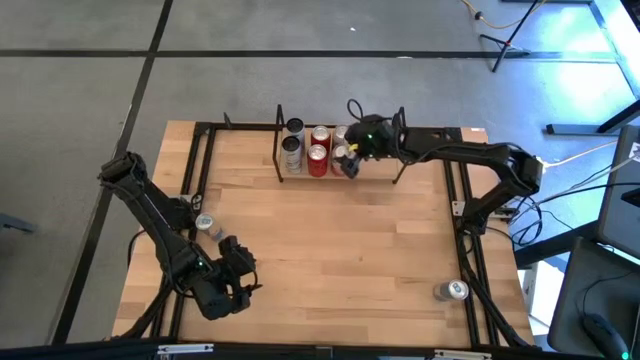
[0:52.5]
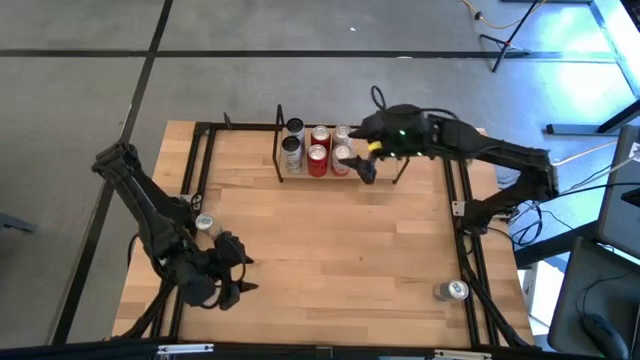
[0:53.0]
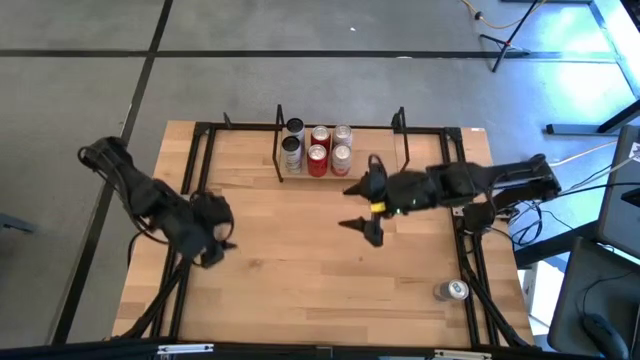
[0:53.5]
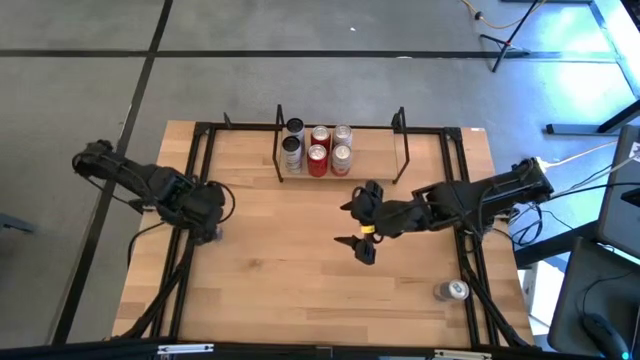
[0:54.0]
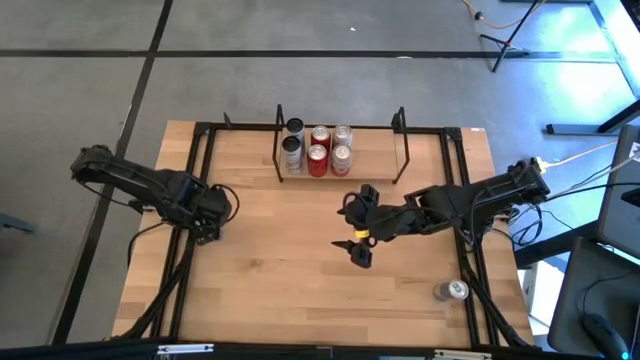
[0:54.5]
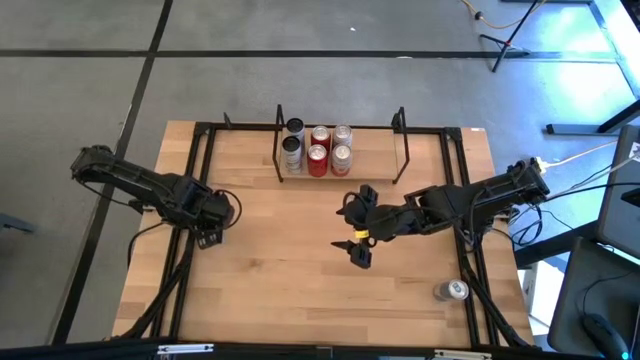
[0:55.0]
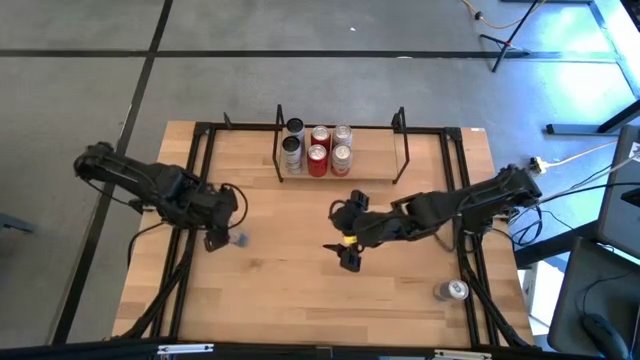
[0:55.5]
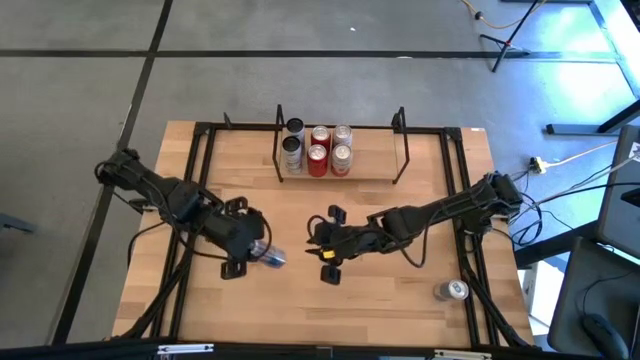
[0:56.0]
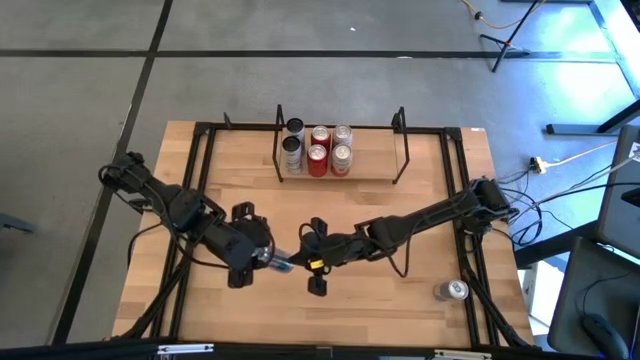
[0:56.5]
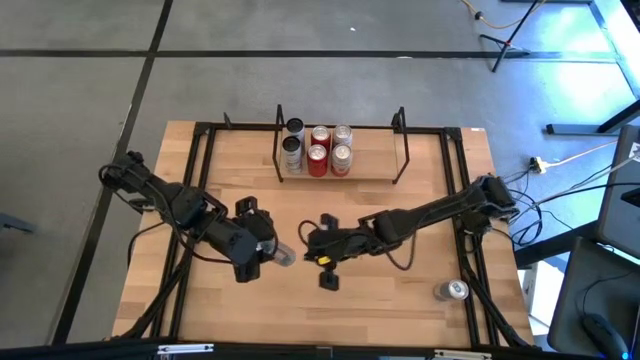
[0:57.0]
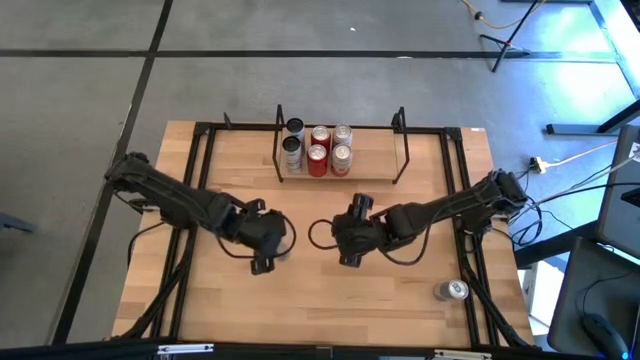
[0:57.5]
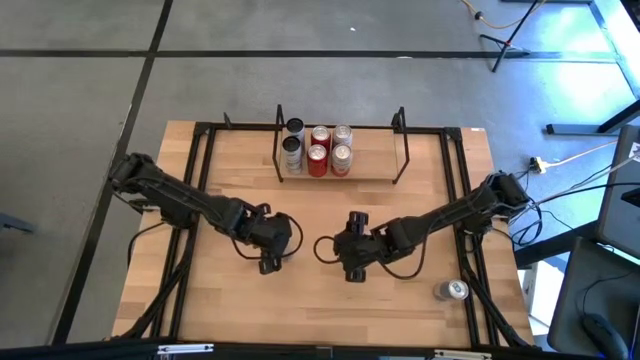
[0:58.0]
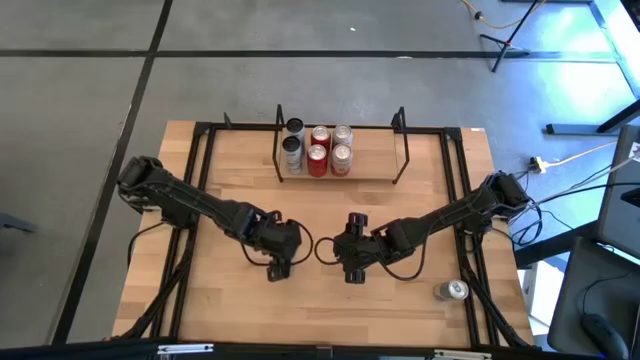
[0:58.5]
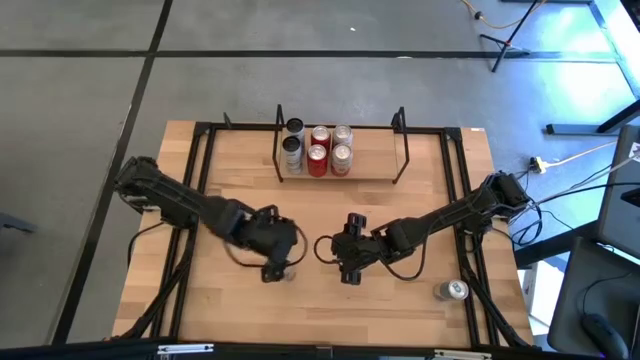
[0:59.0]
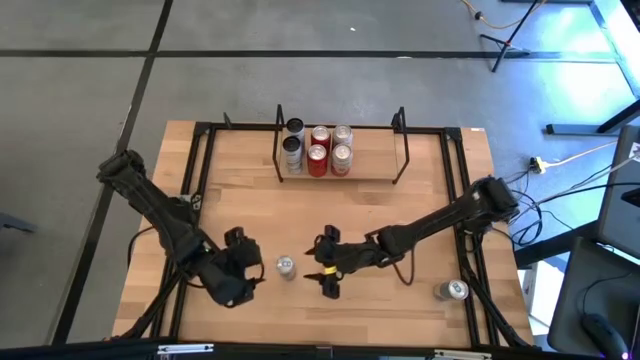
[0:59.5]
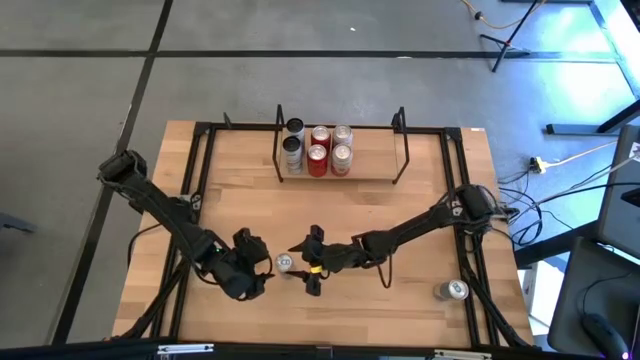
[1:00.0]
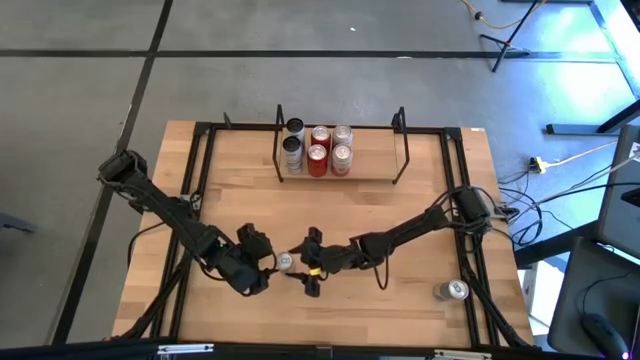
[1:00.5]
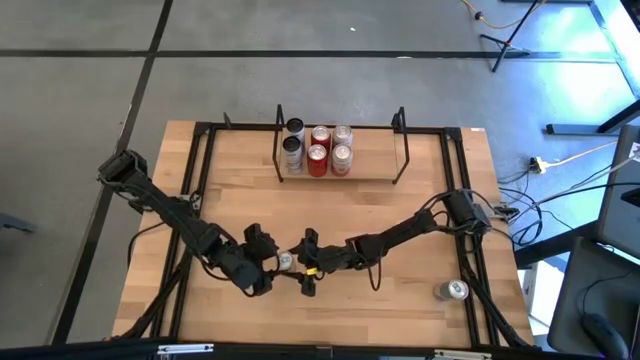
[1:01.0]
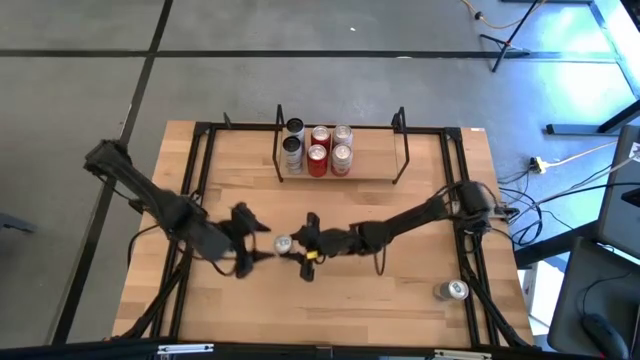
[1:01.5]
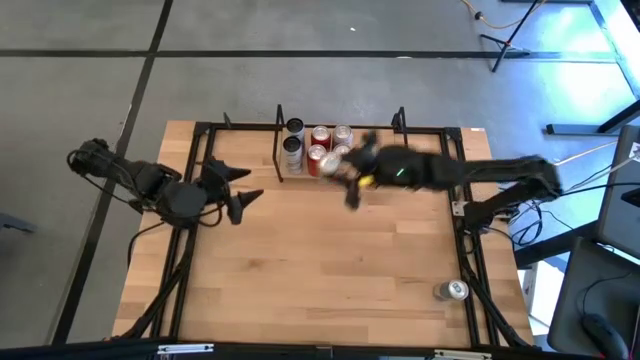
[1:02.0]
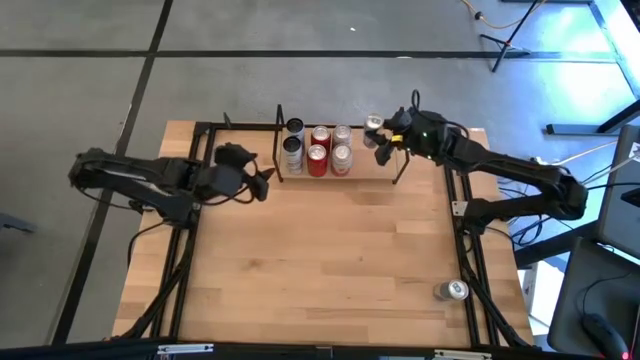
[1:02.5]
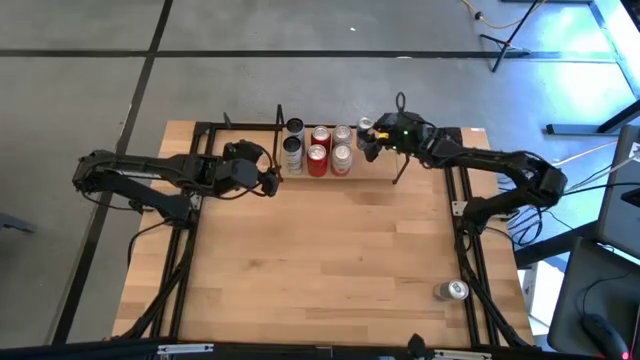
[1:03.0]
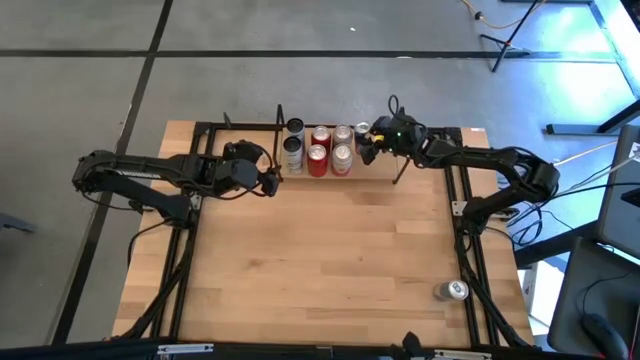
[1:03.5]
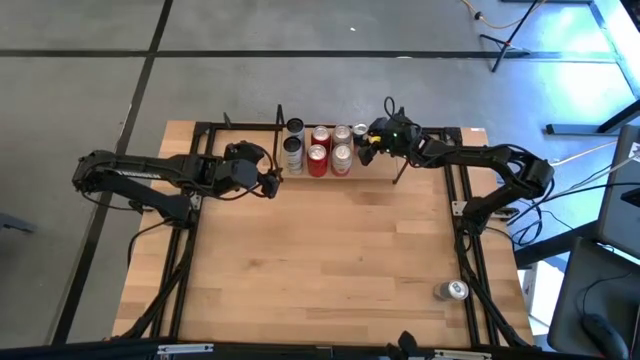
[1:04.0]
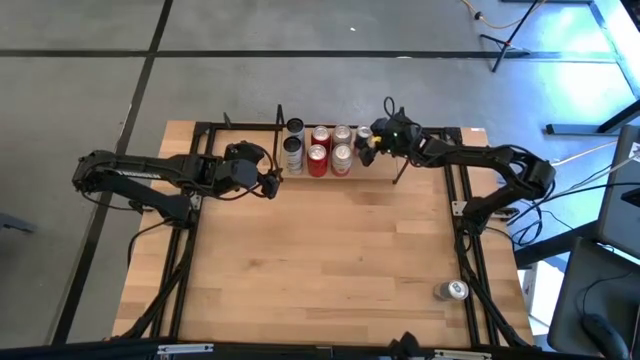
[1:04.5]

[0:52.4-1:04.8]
Task: Place canned beverage on shelf
Put the left blue soda can on the shelf

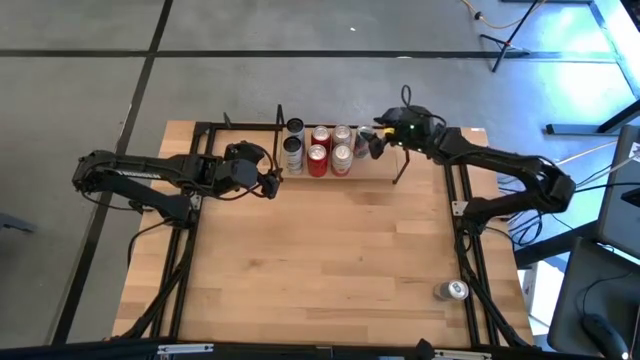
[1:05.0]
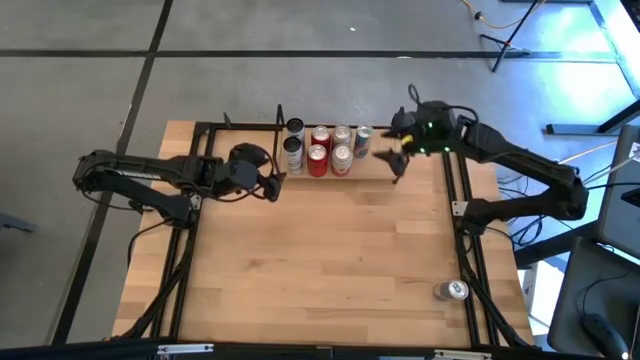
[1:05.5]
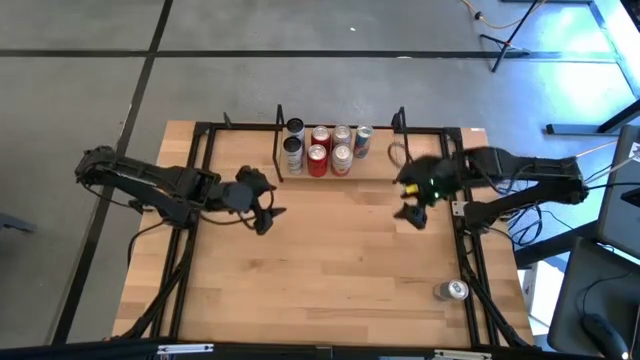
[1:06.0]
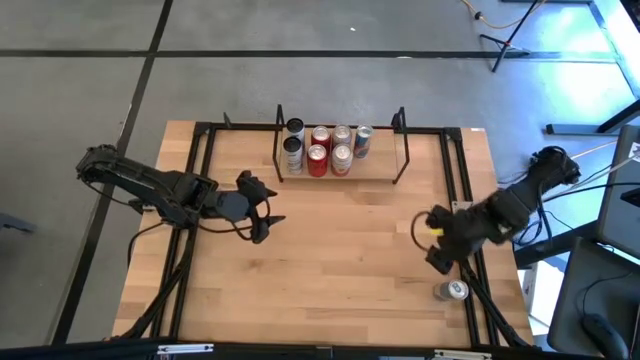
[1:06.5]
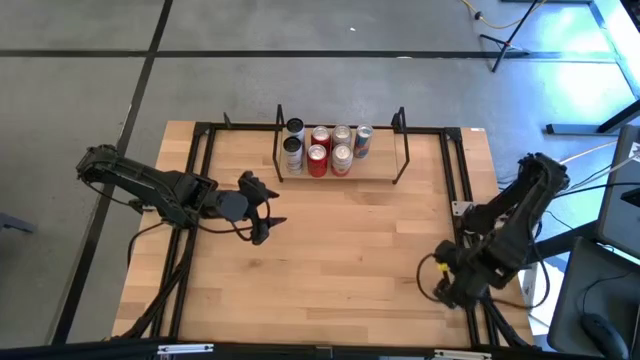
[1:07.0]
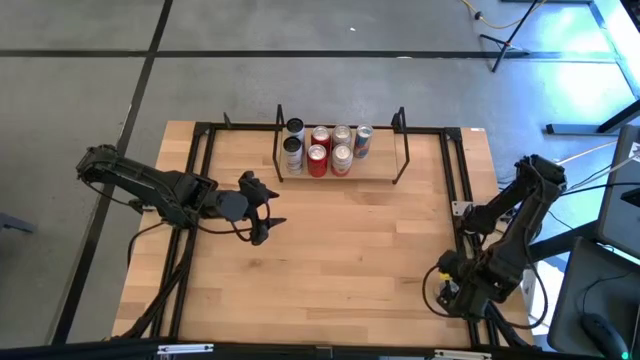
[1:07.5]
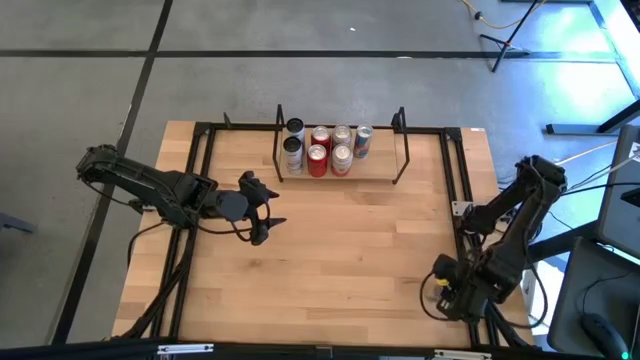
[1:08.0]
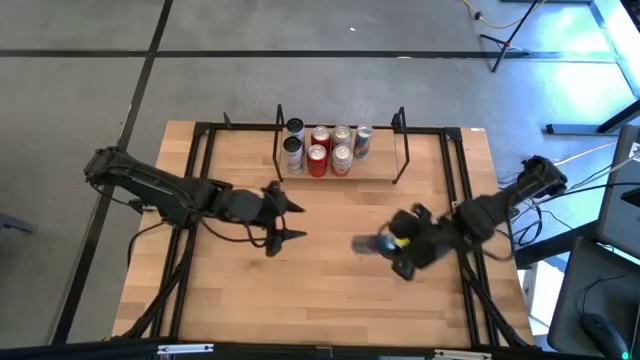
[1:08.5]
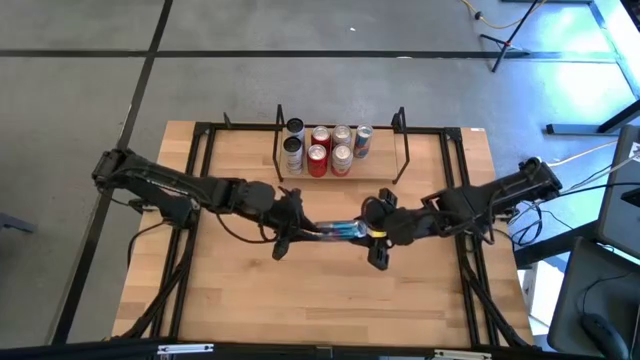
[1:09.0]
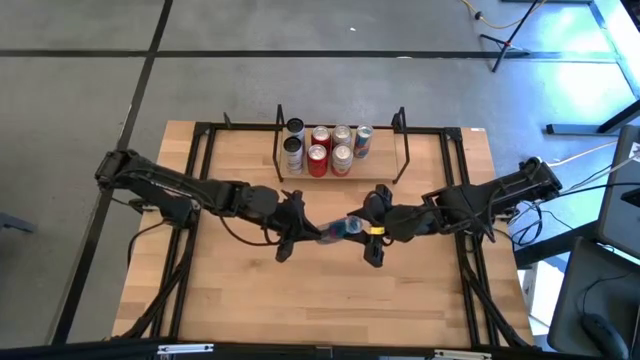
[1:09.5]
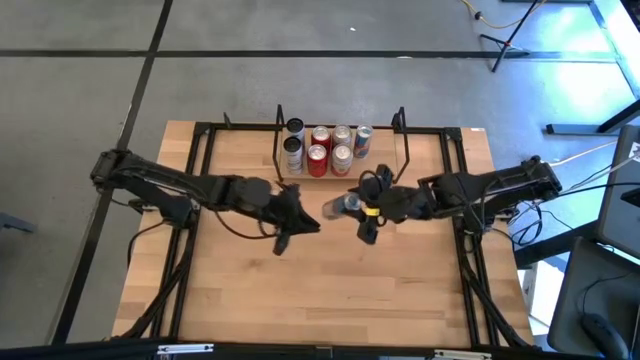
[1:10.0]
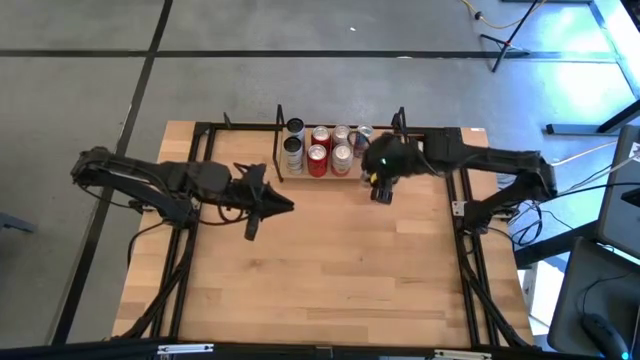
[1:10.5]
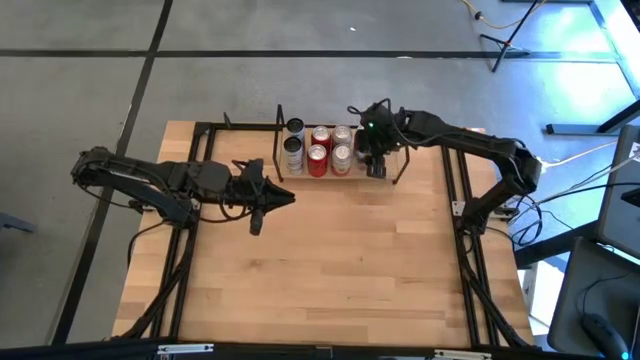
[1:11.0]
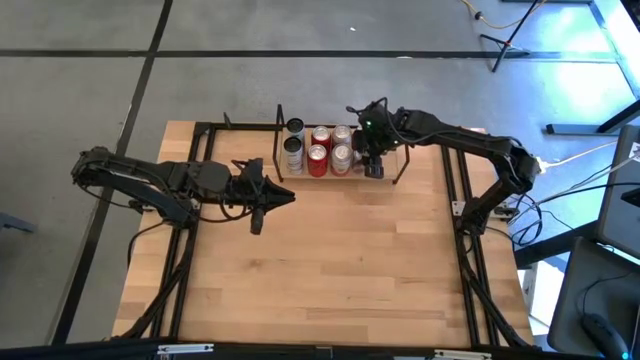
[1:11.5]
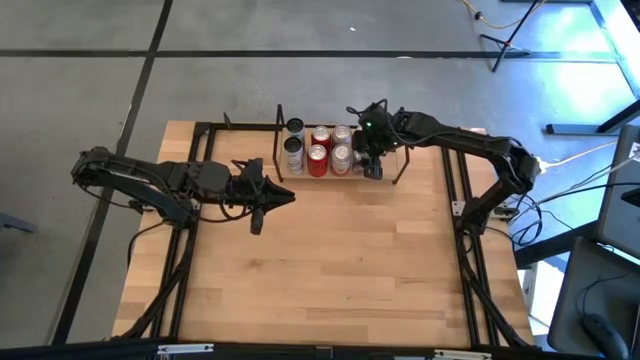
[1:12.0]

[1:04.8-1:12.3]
Put the blue soda can on the shelf

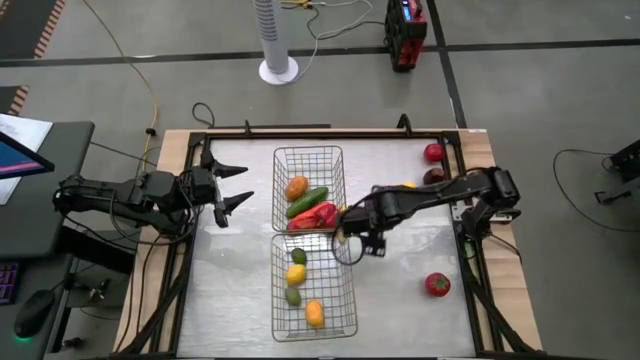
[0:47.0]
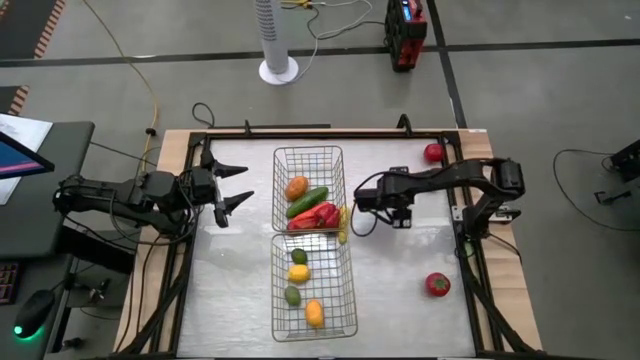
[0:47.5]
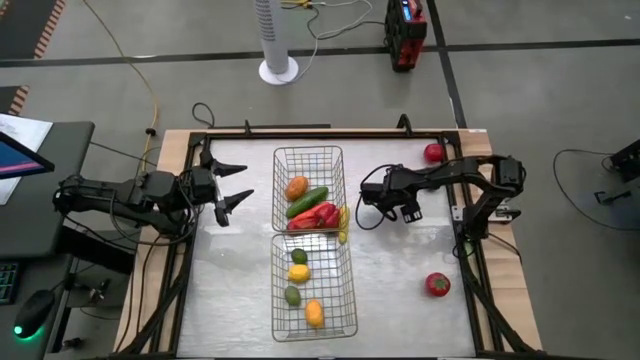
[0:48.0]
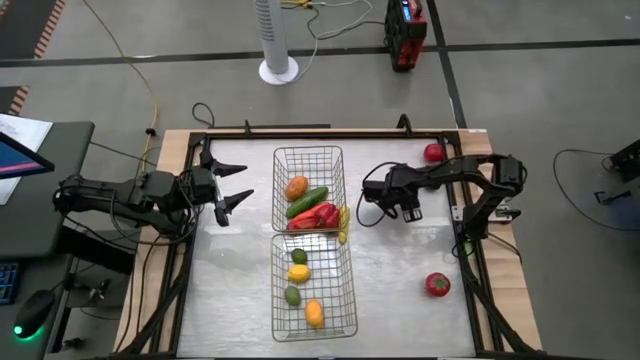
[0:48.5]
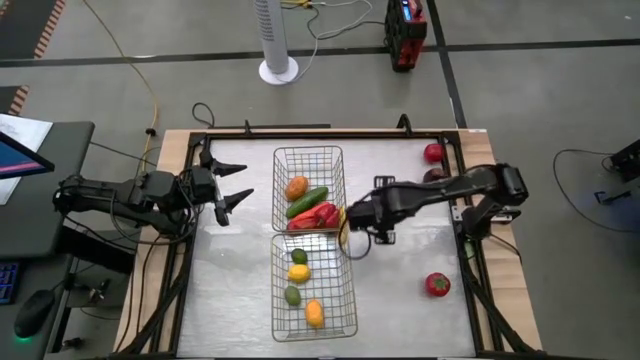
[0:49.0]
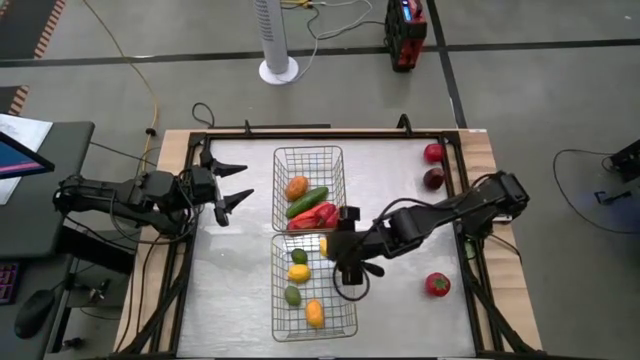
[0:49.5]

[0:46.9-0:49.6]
Task: Sort produce into baskets
Put the lemon into the bottom wire basket
